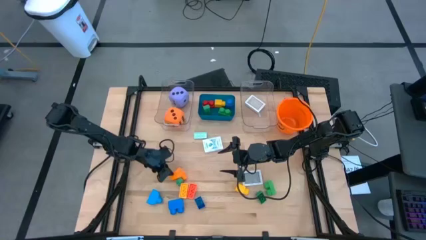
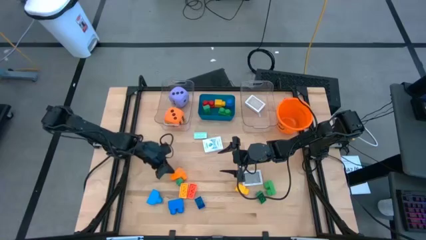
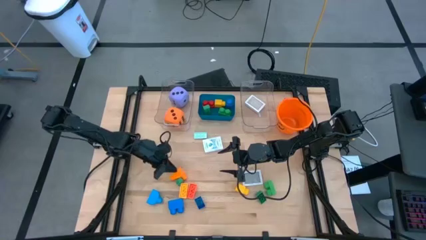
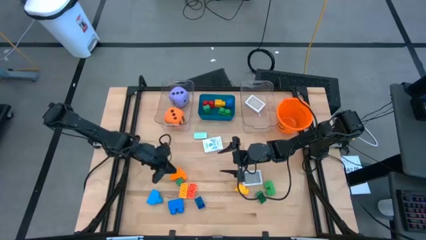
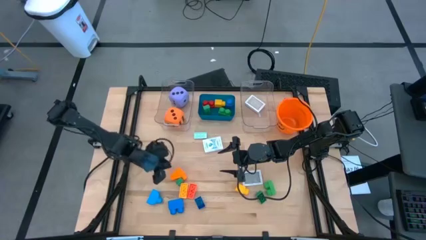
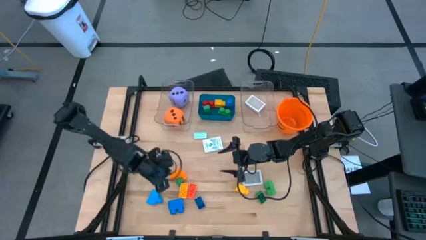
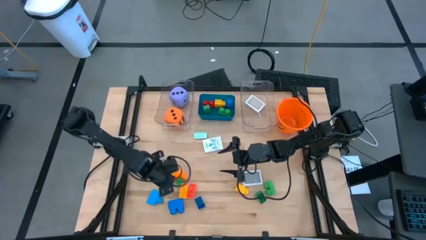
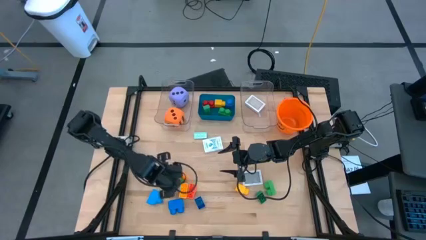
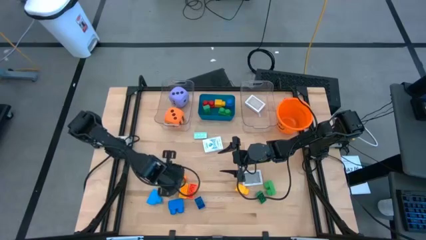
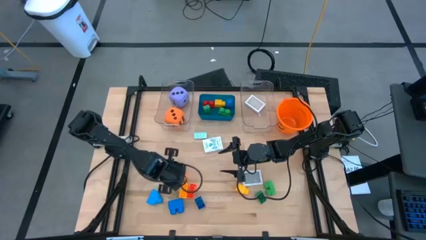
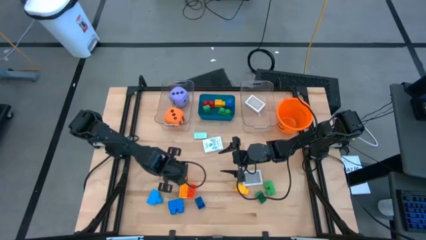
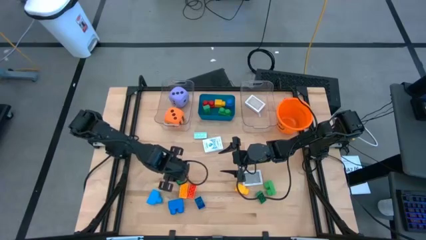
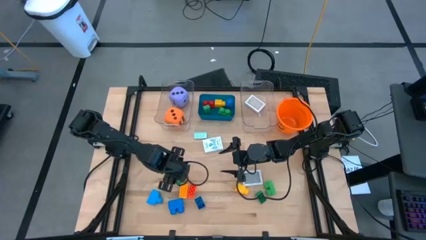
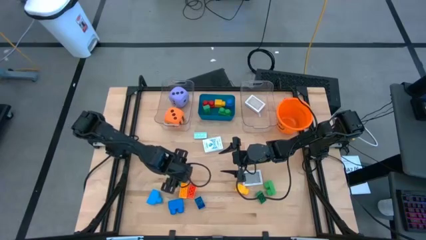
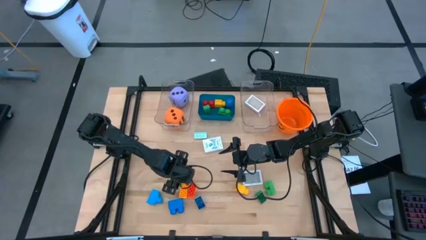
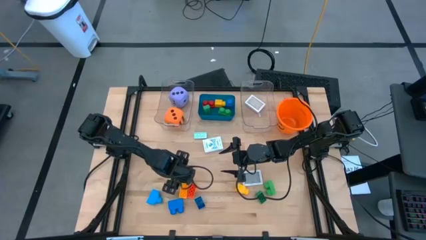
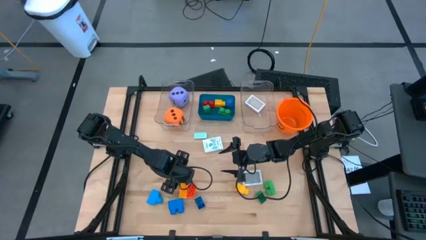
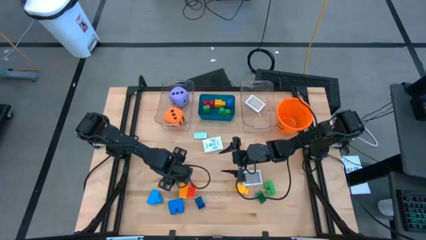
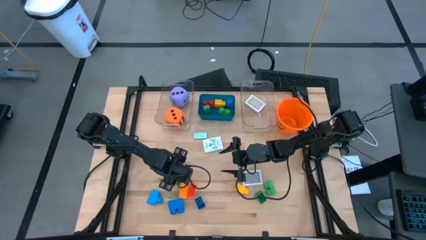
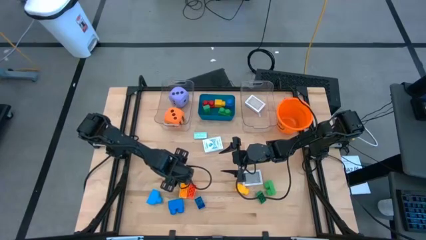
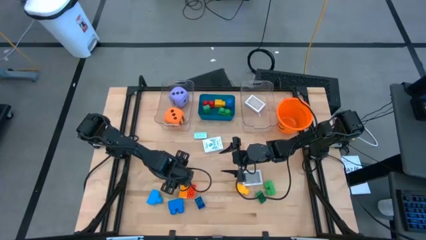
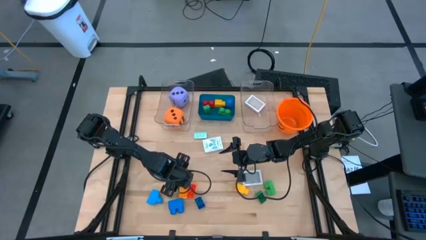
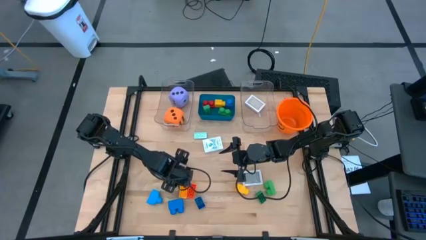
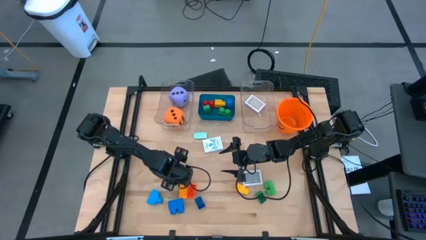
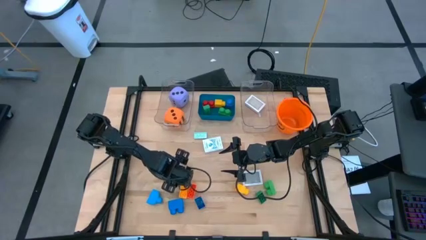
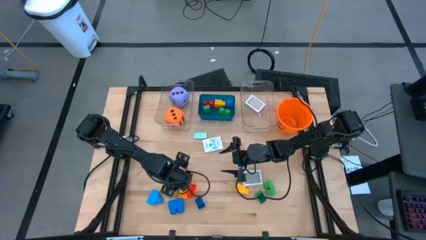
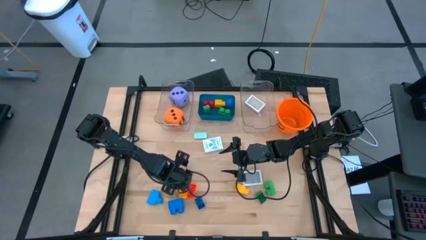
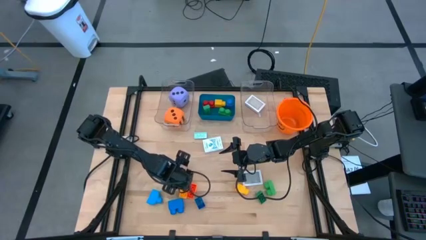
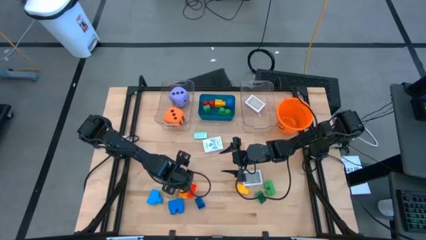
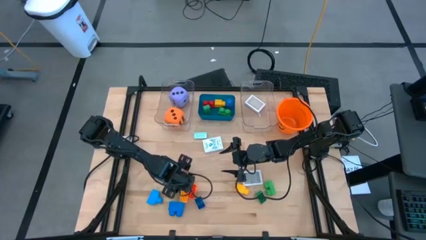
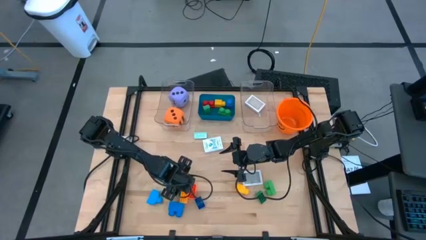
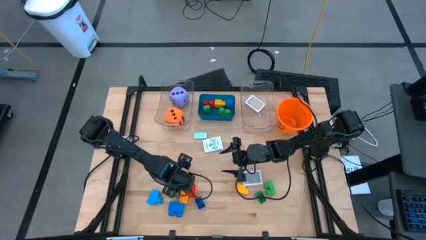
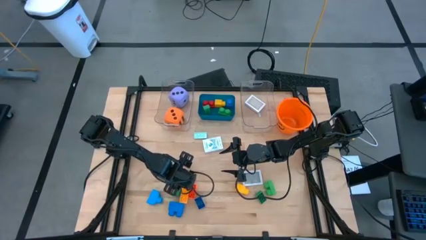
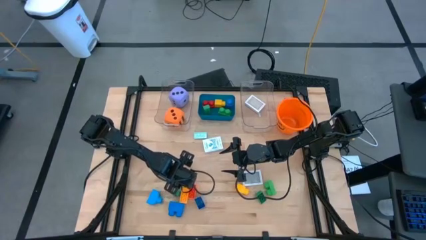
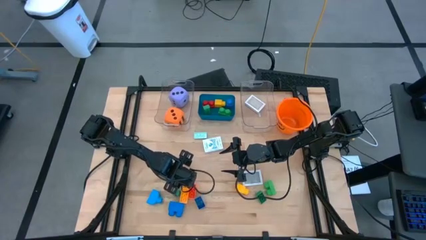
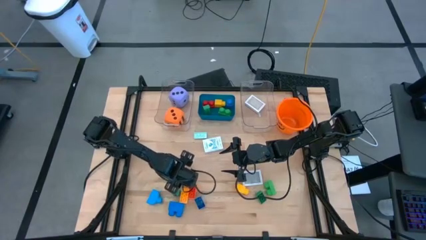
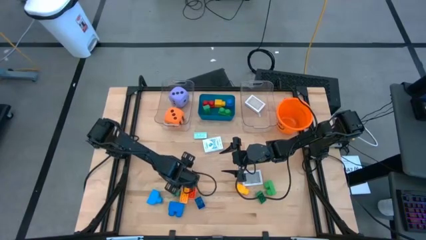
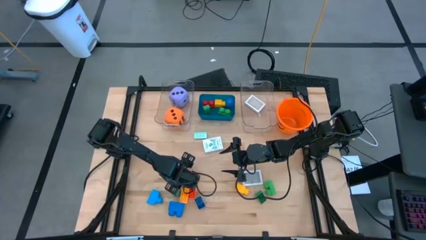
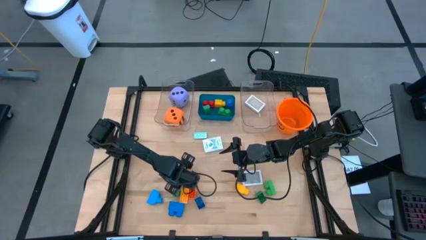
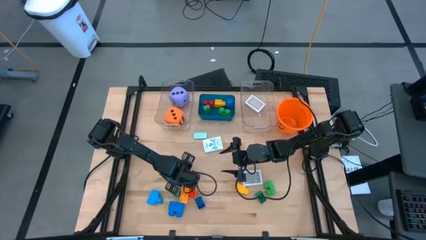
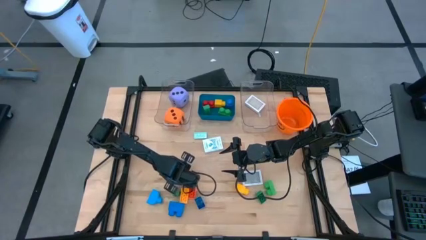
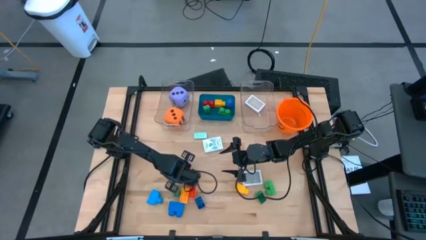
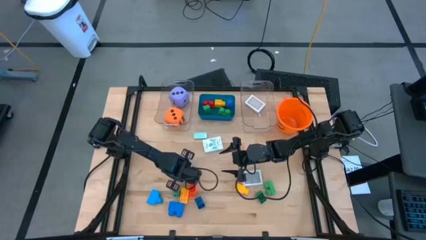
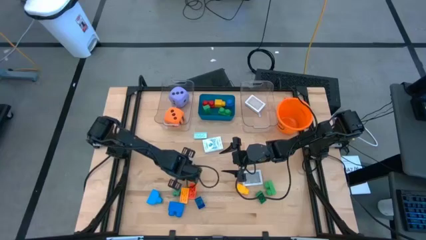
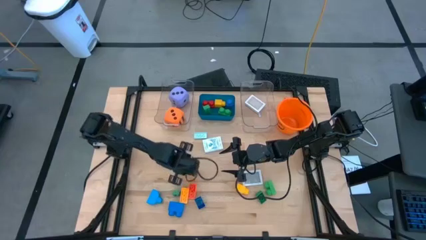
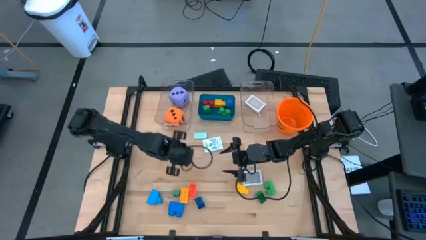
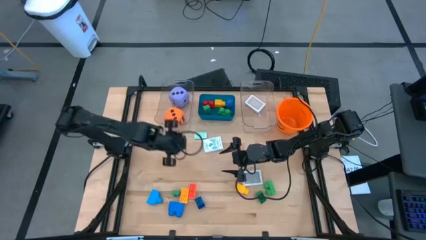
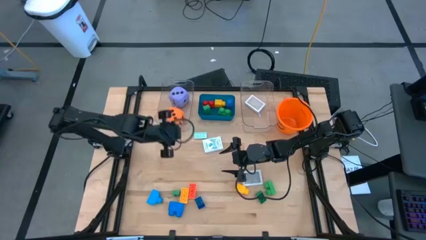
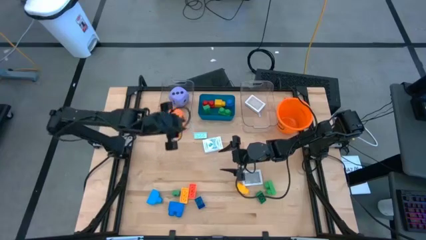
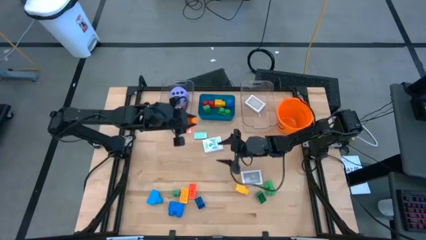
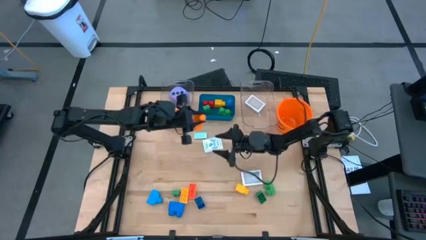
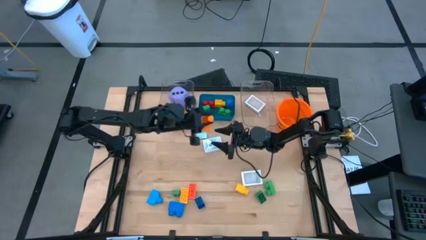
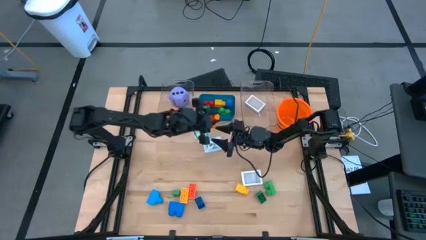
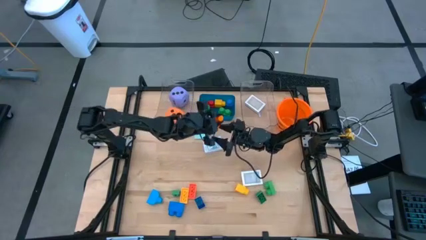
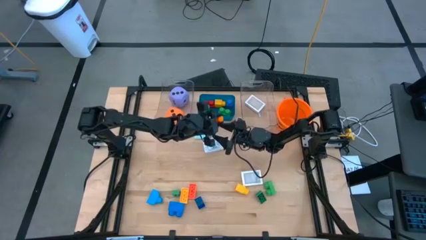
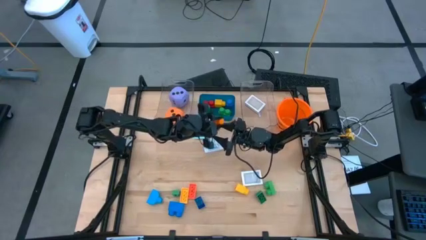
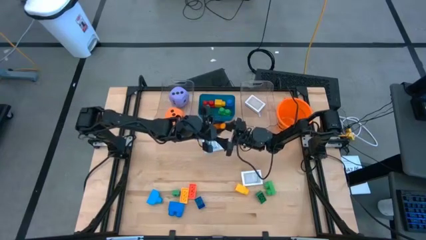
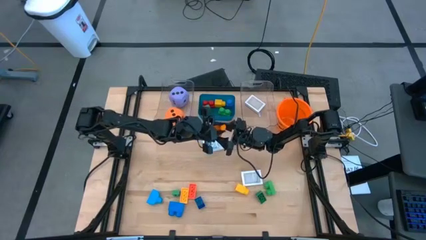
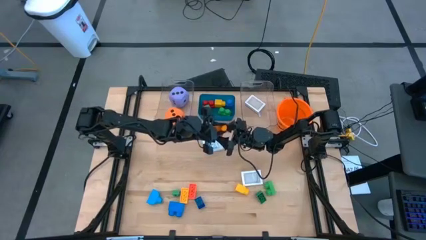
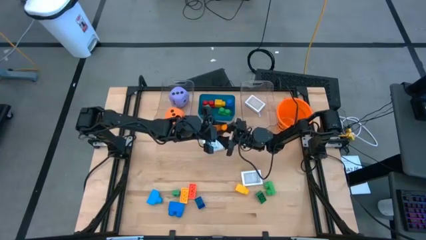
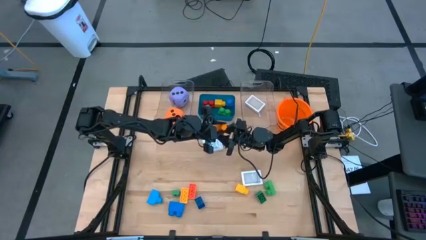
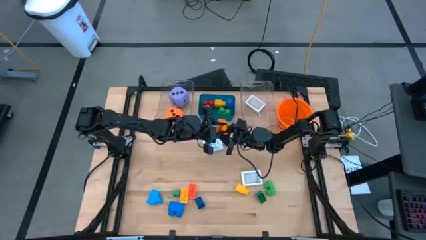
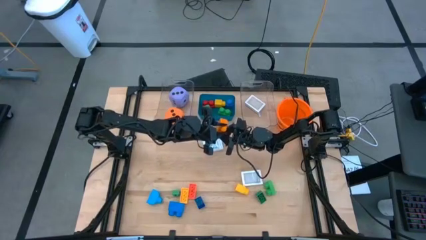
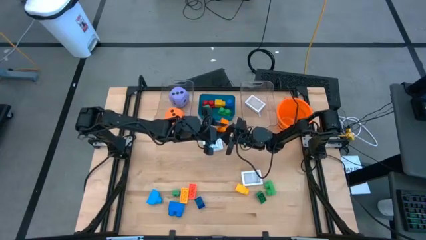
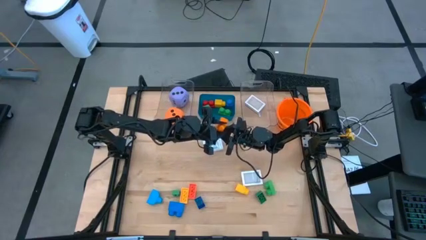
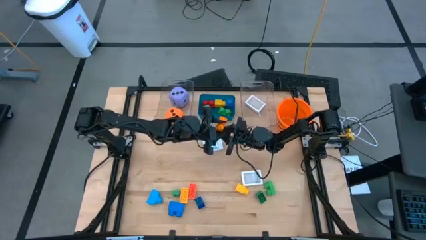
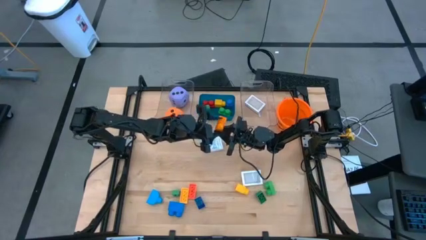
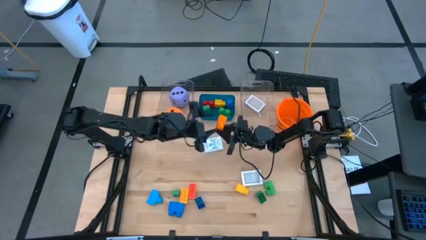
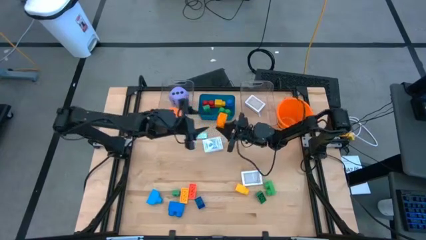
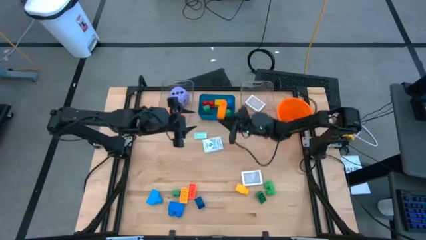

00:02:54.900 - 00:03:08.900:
Task: Pick & Place Toys
Put the orange game piece into the blue bin

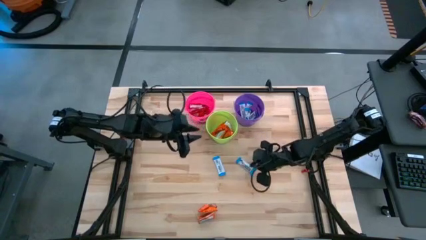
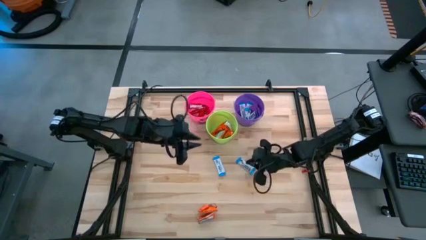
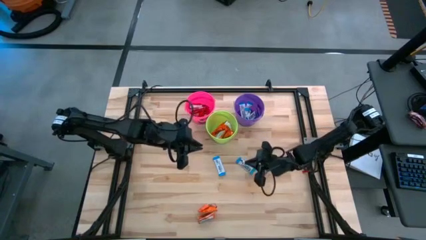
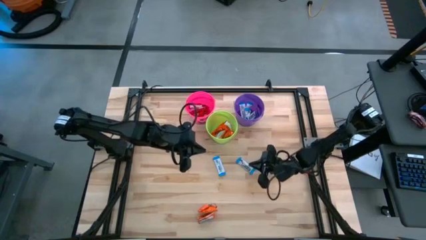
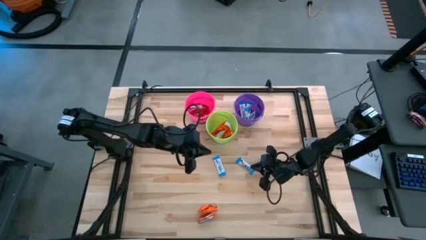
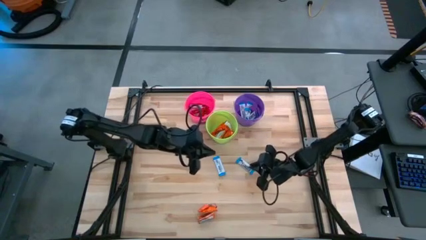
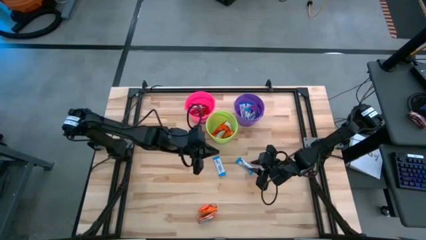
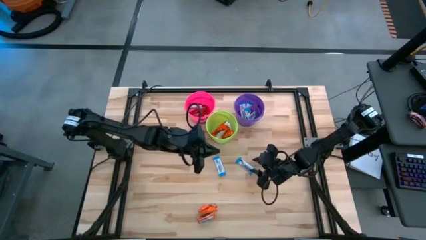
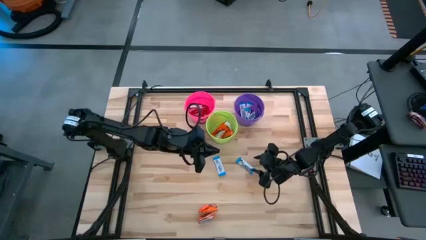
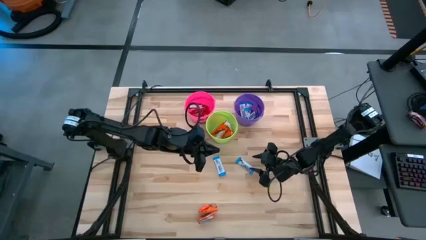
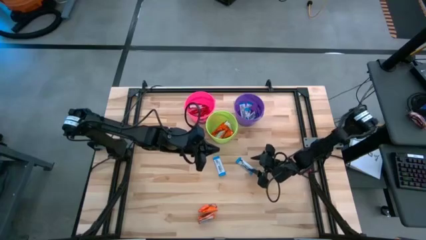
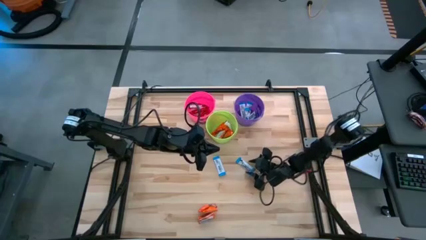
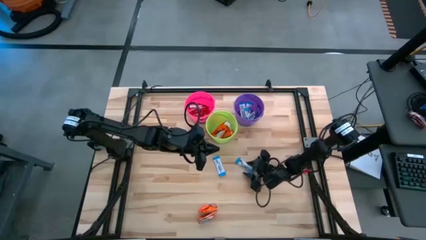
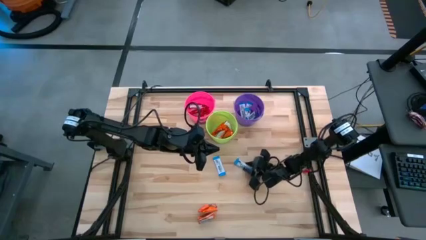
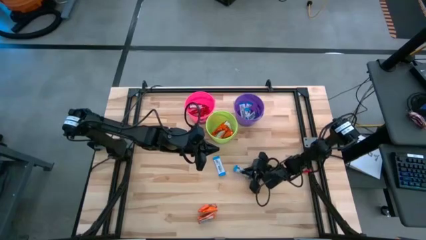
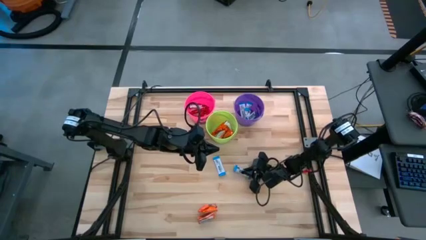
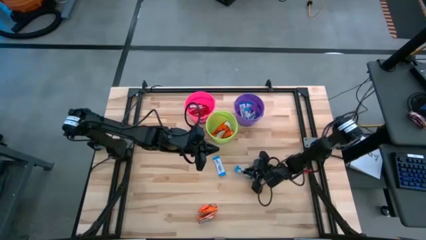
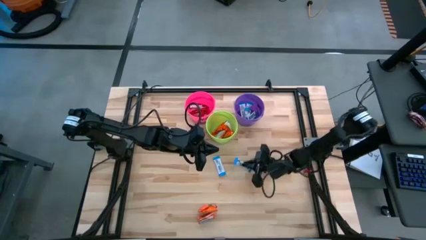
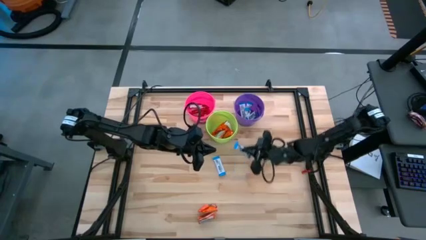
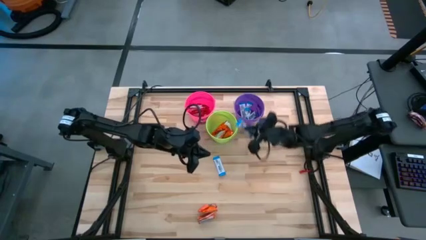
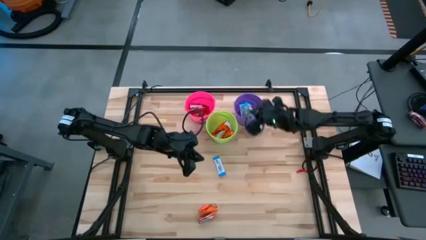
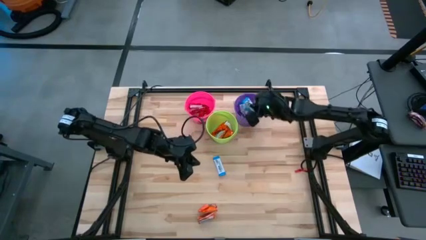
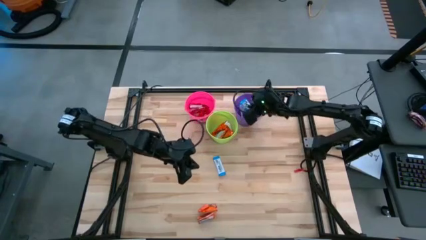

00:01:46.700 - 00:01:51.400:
Task: Sort candy
Put the blue candy into the violet bin
